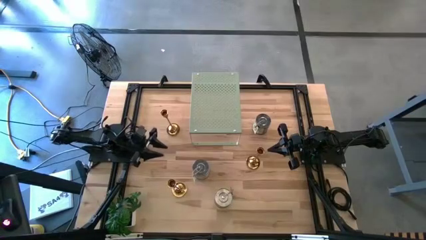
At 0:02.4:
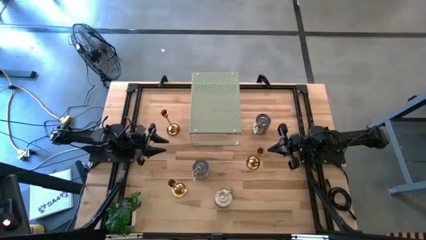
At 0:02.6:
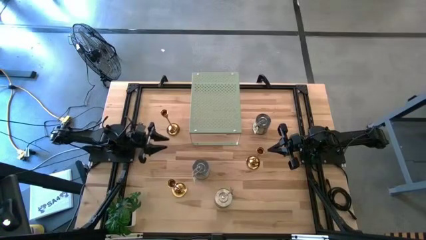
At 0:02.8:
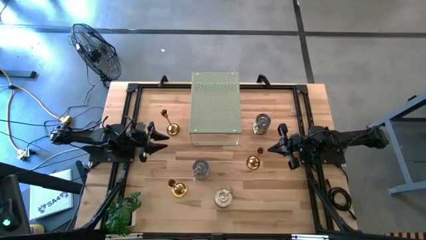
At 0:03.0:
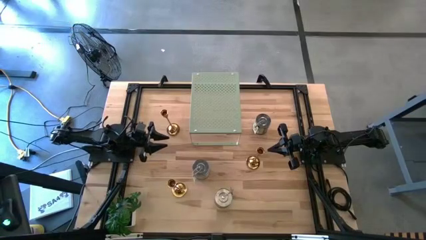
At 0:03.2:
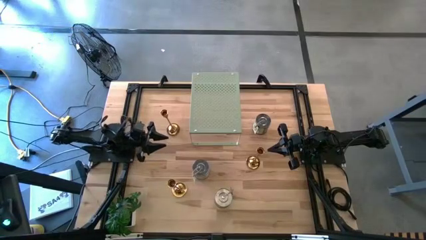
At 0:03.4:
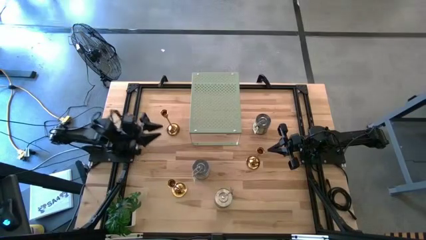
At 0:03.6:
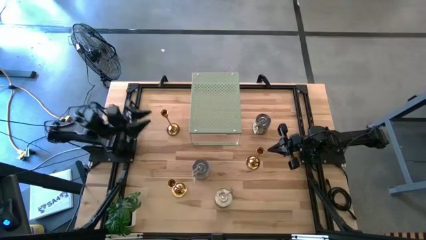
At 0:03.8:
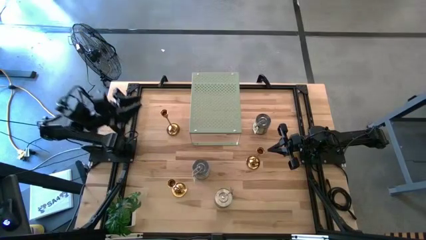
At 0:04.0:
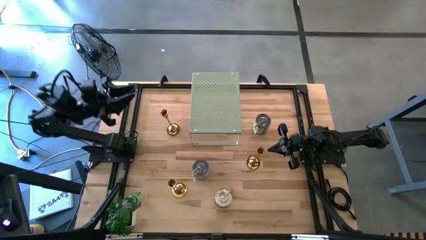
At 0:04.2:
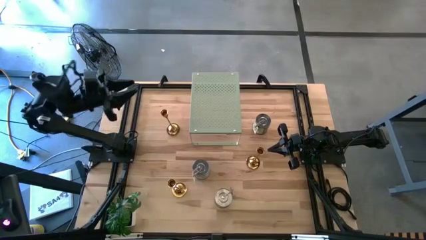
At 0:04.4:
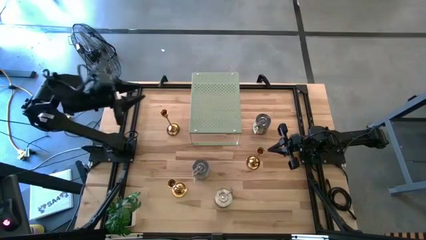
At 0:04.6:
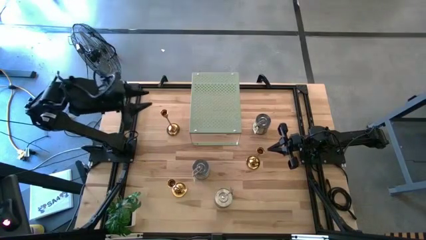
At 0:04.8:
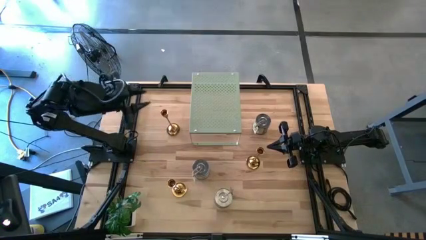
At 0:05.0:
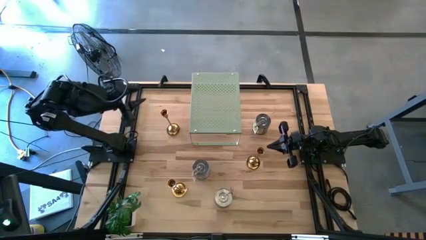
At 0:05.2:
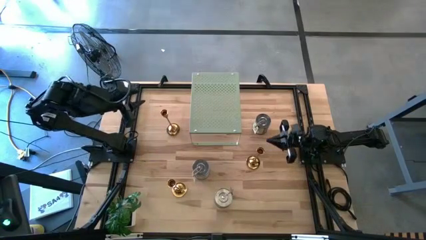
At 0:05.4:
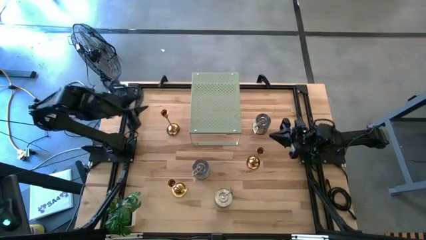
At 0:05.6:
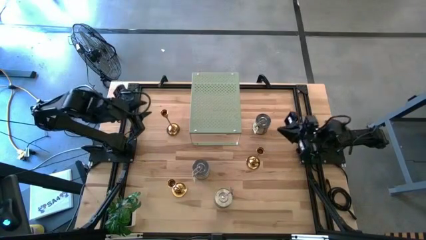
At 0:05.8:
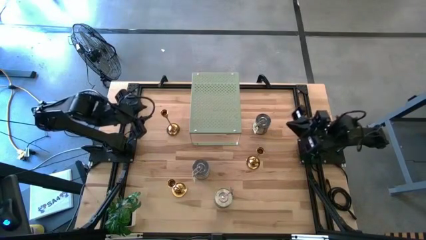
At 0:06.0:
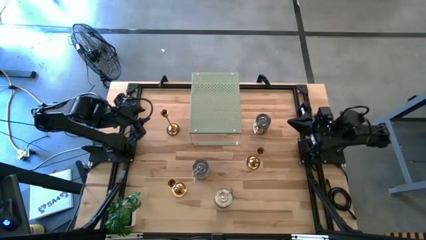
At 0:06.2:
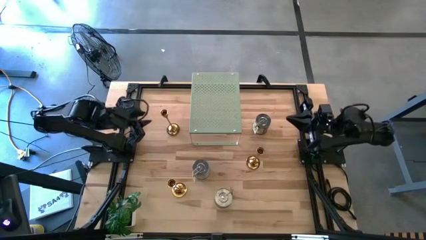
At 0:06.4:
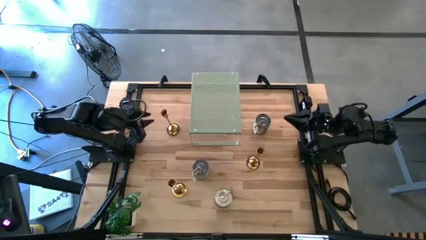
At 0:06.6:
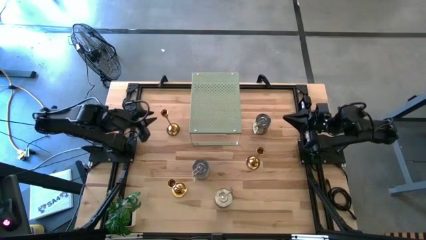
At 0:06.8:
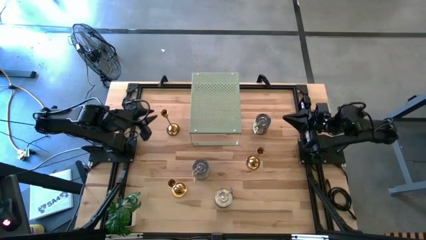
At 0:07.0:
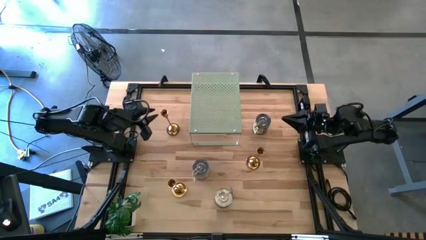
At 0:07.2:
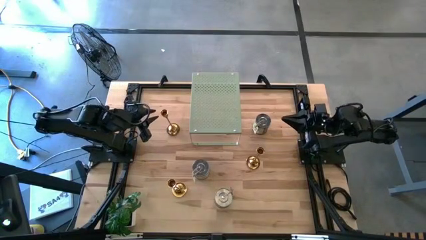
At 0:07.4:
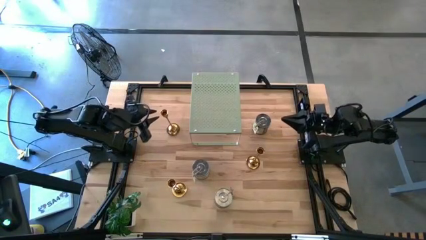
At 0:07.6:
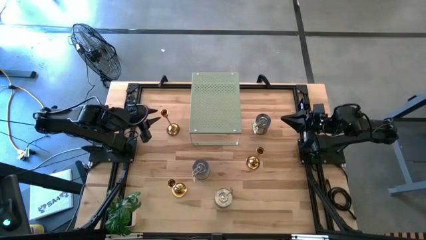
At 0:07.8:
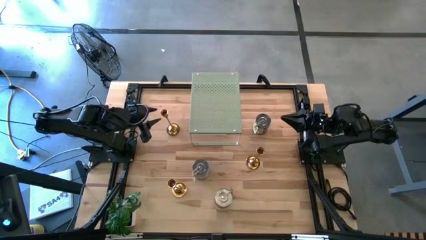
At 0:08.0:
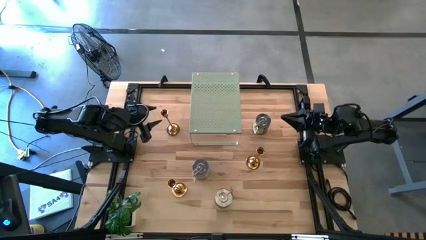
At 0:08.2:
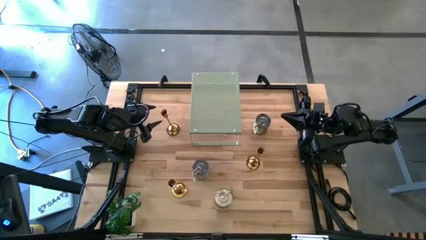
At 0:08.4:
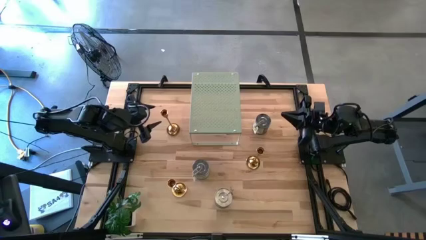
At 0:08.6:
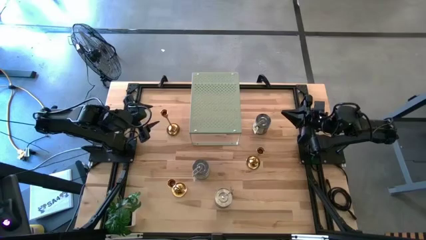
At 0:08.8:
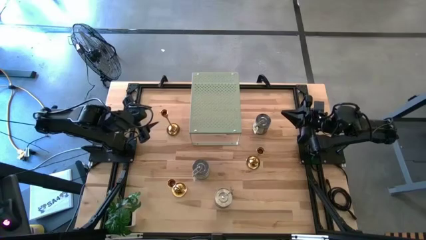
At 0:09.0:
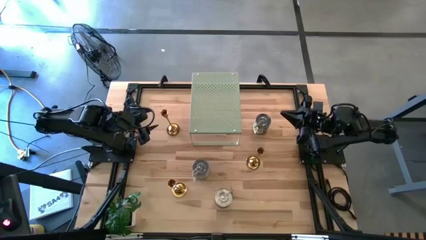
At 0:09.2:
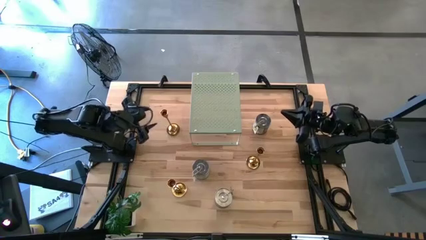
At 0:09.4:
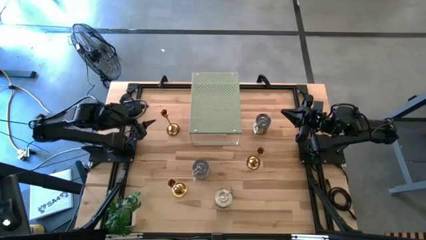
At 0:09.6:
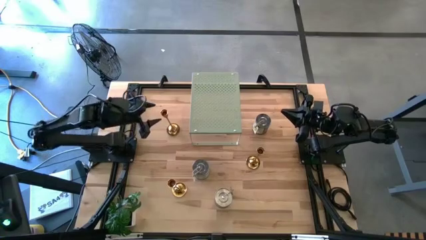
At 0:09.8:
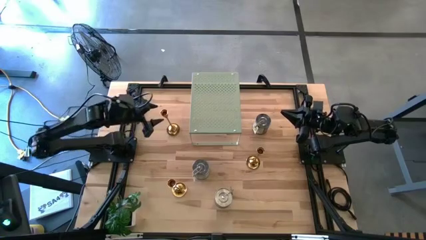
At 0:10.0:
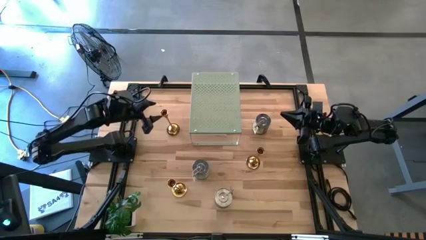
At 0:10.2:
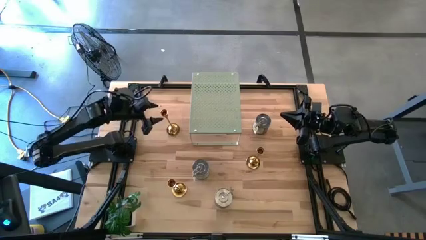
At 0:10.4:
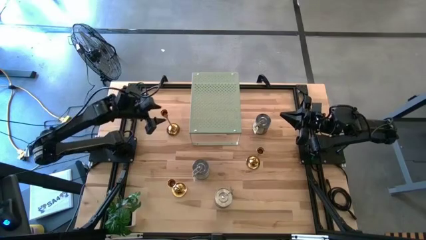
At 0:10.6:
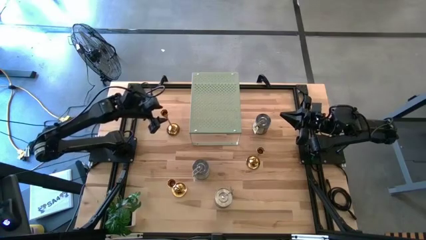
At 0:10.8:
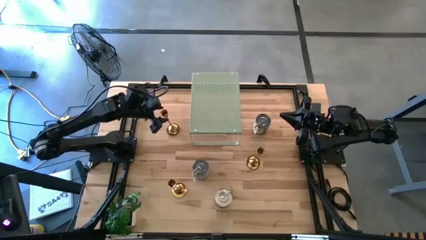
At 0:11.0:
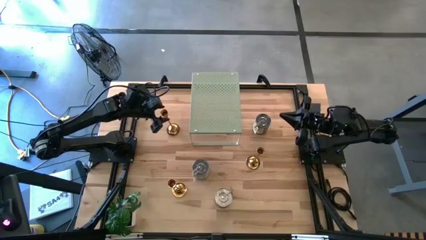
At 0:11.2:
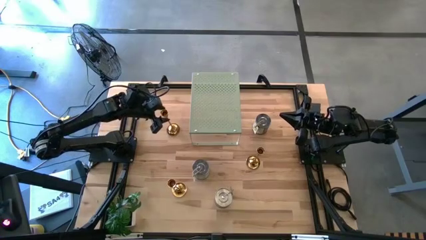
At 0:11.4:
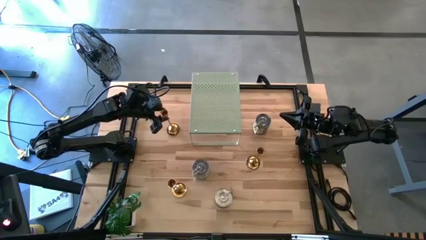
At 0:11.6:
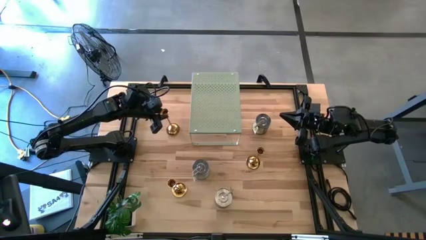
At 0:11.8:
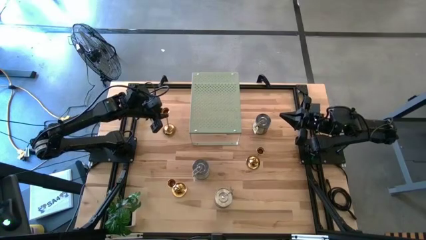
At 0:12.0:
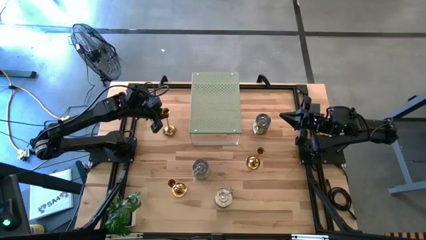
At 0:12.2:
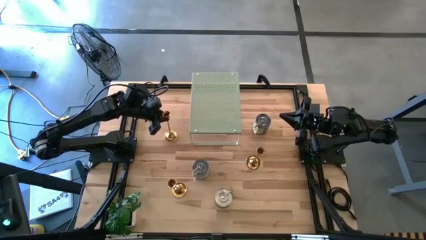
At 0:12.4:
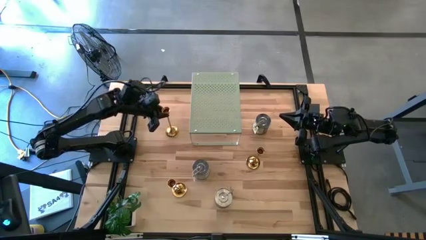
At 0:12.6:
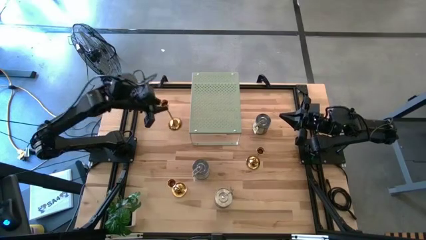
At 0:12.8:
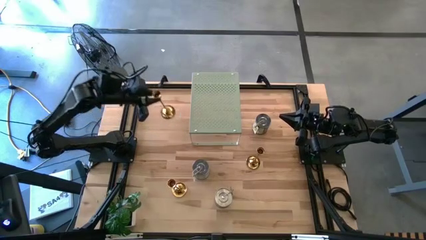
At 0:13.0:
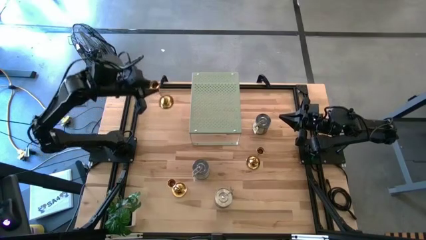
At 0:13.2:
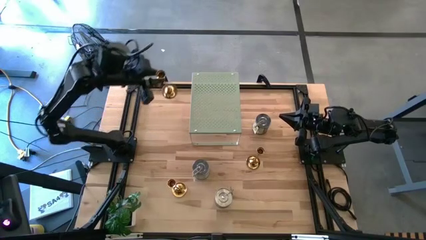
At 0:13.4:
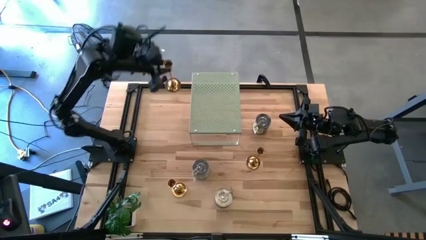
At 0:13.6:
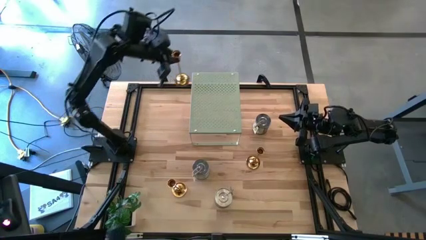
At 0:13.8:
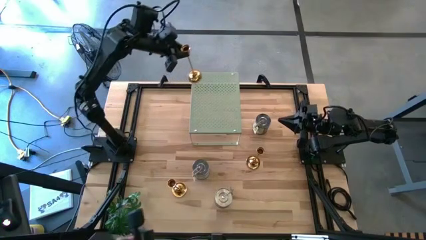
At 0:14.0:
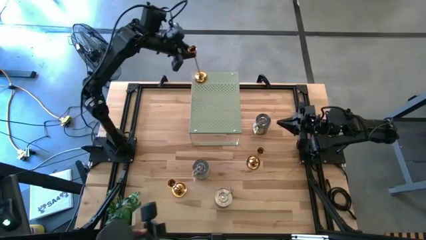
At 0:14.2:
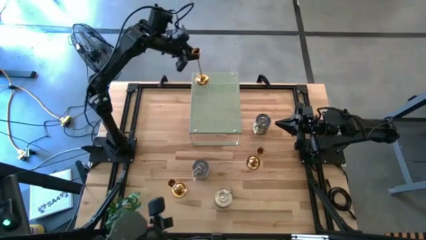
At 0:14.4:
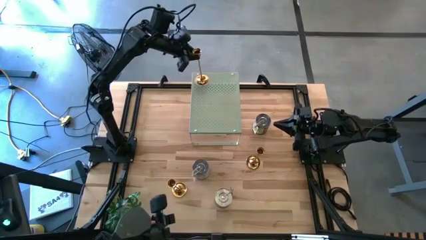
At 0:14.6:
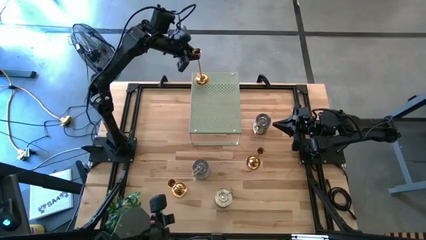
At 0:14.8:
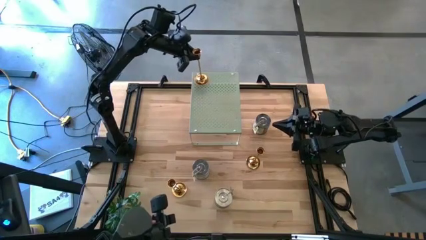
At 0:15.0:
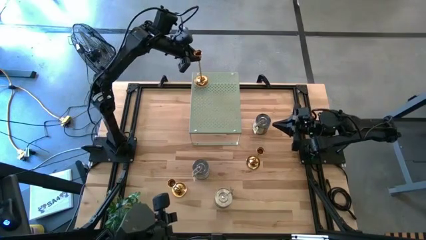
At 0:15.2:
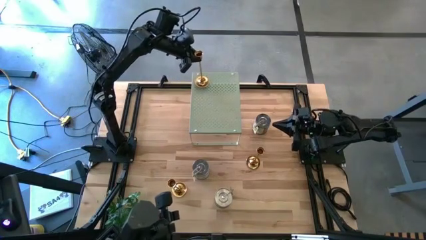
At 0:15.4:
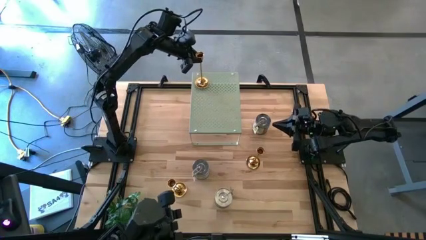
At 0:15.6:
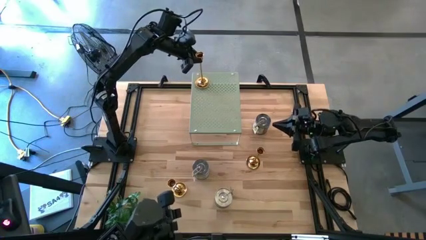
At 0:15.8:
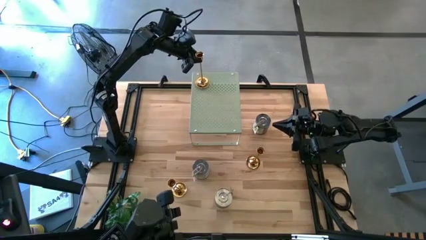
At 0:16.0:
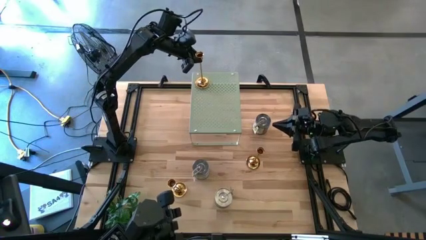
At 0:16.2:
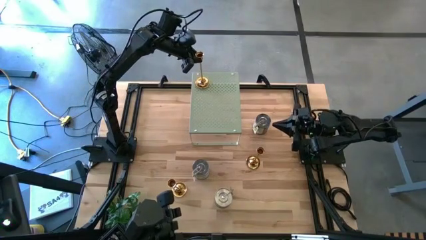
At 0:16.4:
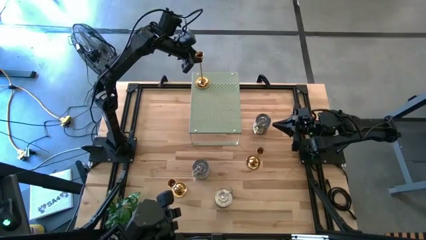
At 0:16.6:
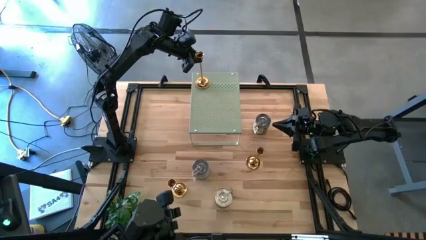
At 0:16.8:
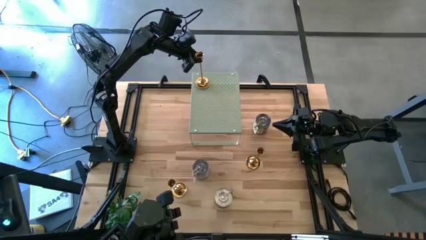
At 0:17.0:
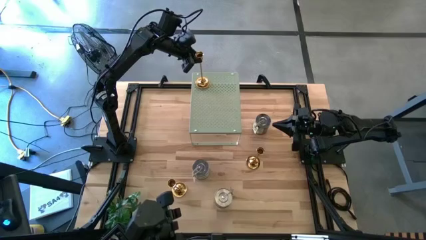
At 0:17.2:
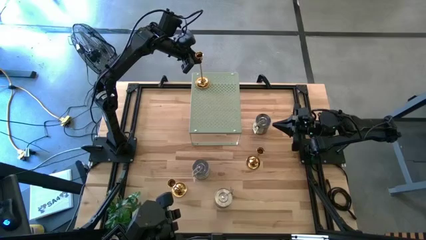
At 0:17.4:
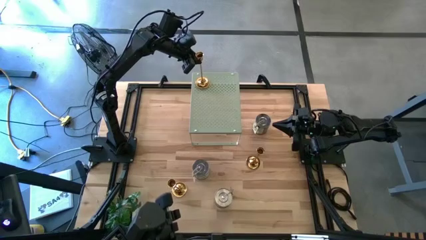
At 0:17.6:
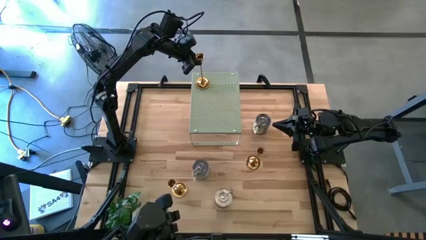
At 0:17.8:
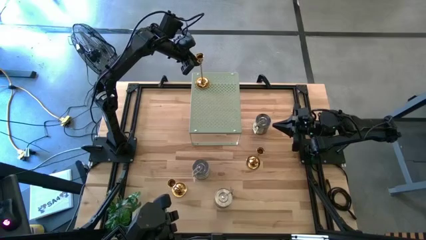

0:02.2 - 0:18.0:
Task: Pick & Place candle stick holders
Put the top gold candle holder on the shelf
